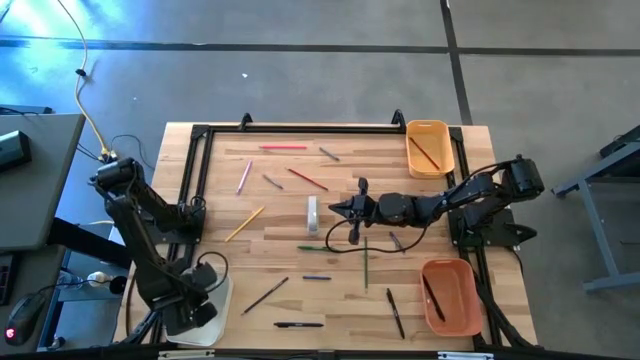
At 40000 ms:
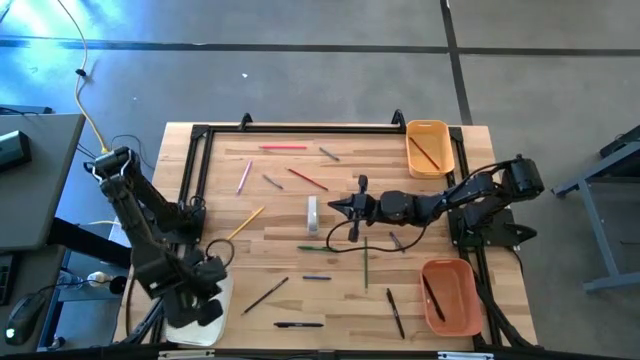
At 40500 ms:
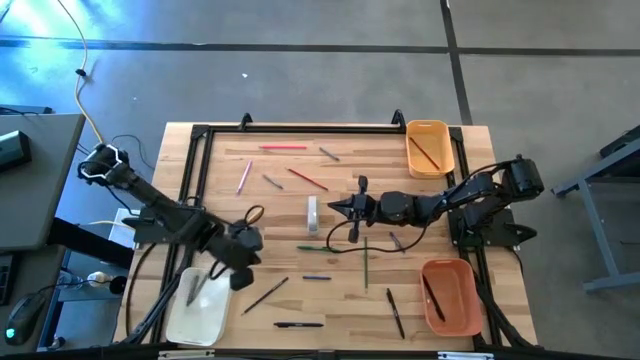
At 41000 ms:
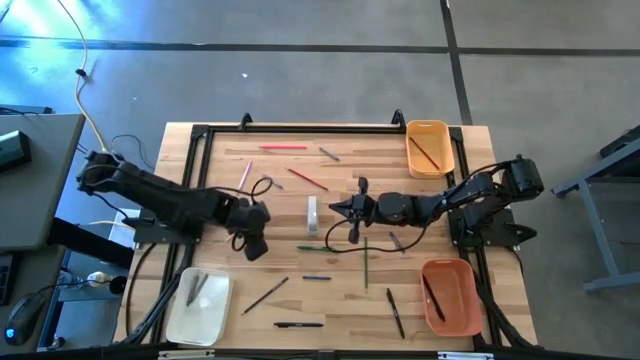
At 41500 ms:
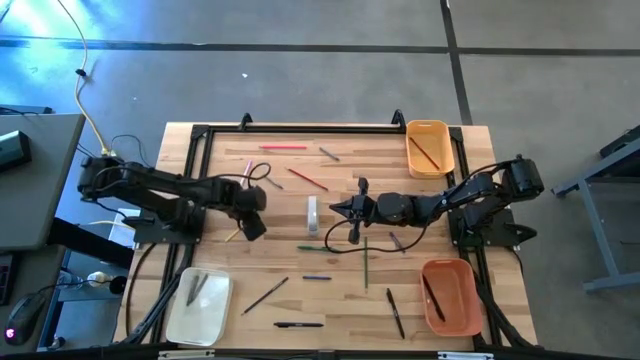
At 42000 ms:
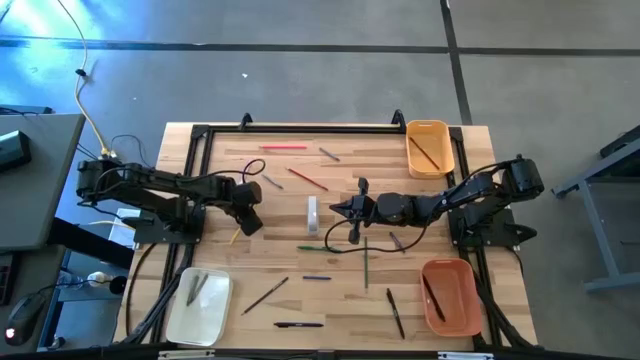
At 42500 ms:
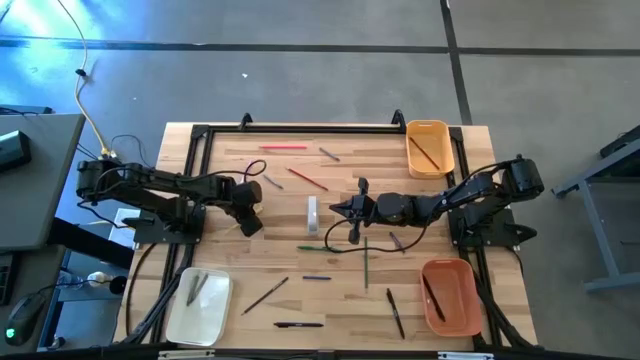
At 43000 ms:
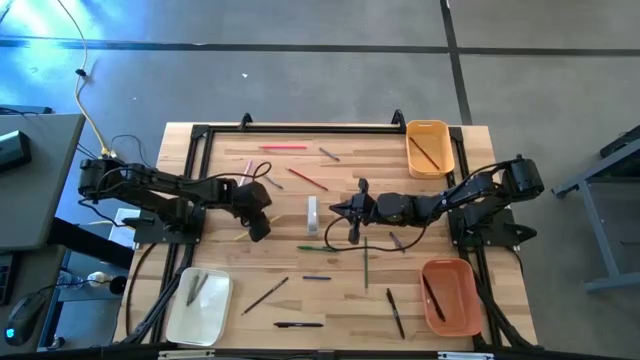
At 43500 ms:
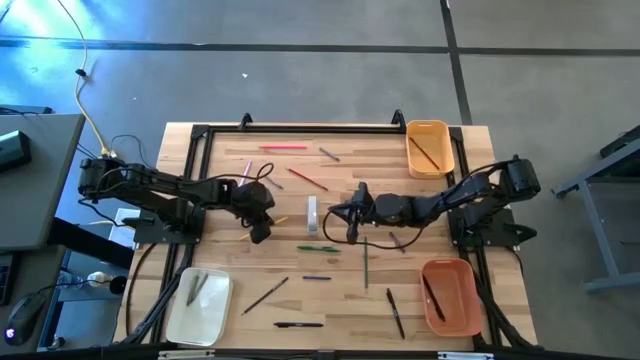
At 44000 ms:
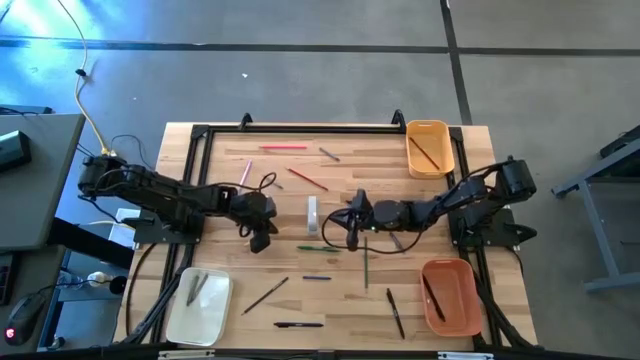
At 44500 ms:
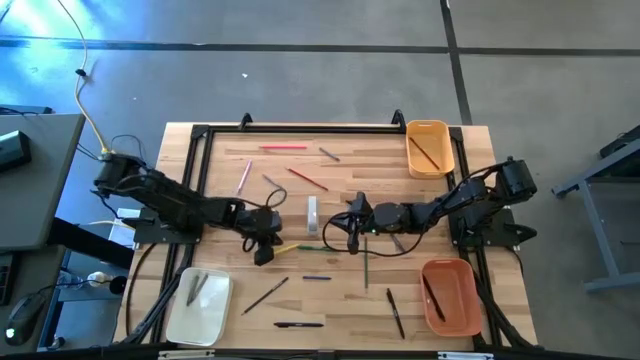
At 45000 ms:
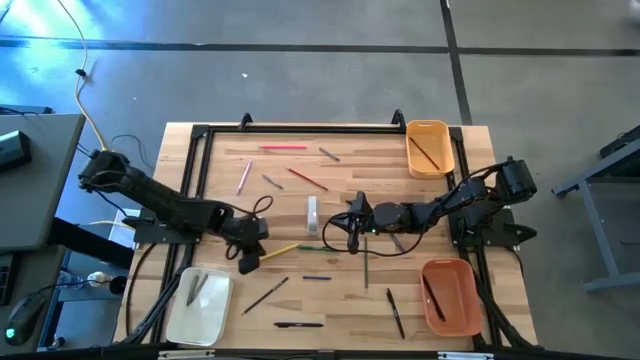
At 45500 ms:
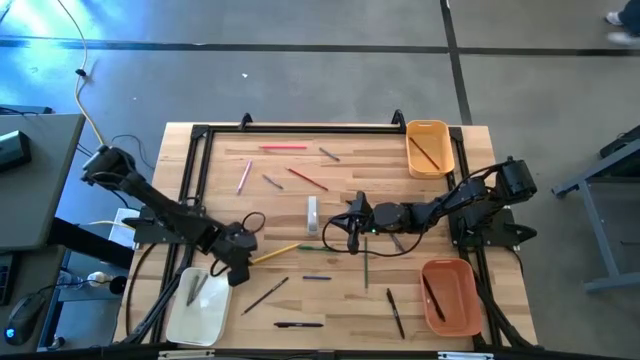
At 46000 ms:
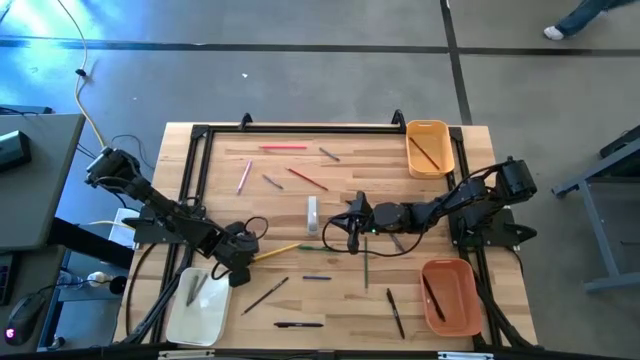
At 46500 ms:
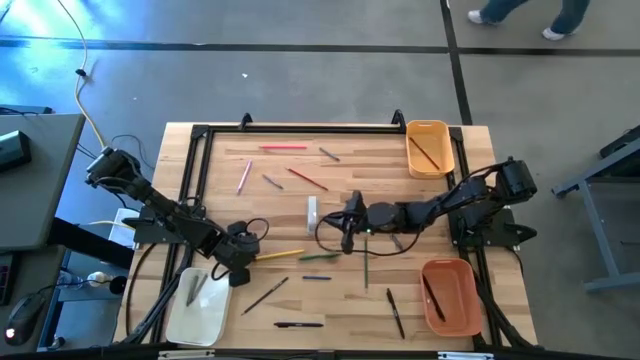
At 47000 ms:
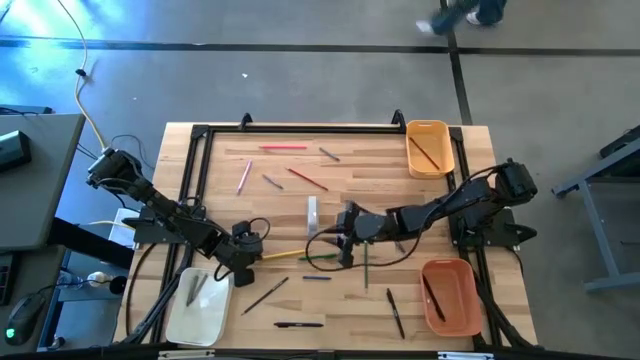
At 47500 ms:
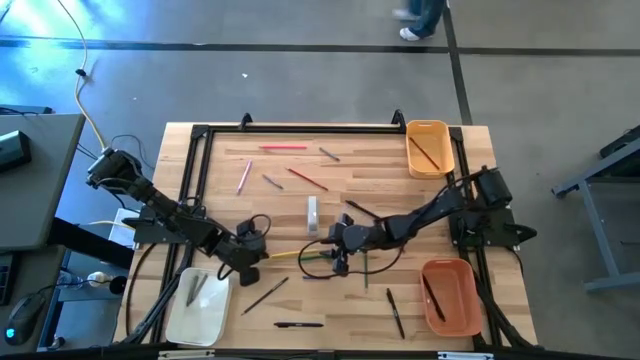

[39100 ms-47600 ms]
Task: Sort crayons/erasers/pens/pencils in bins
Put the yellow pencil into the yellow bin

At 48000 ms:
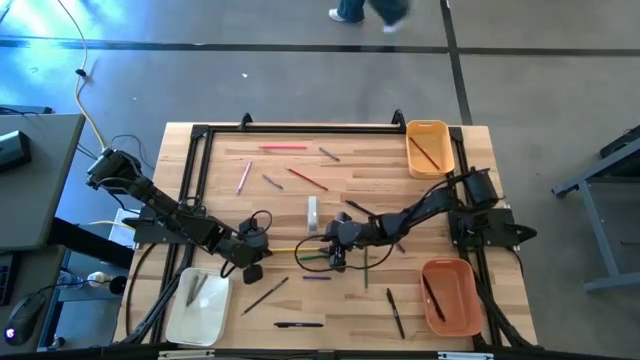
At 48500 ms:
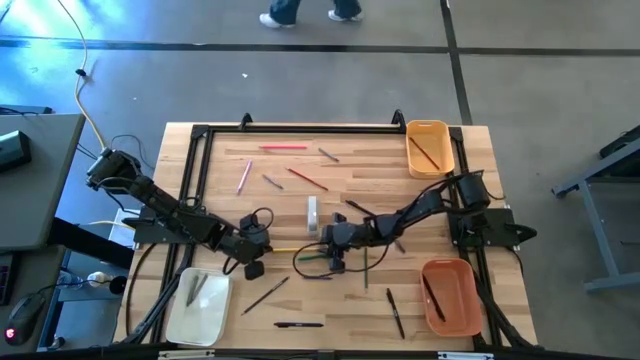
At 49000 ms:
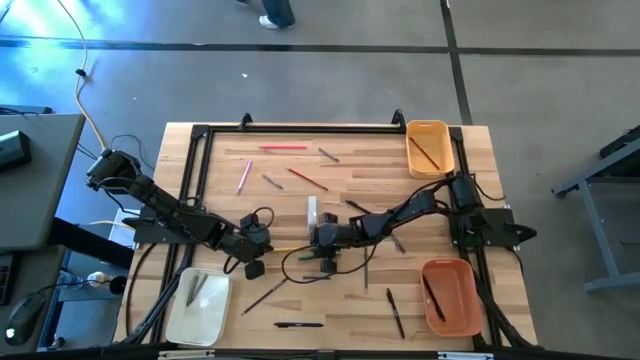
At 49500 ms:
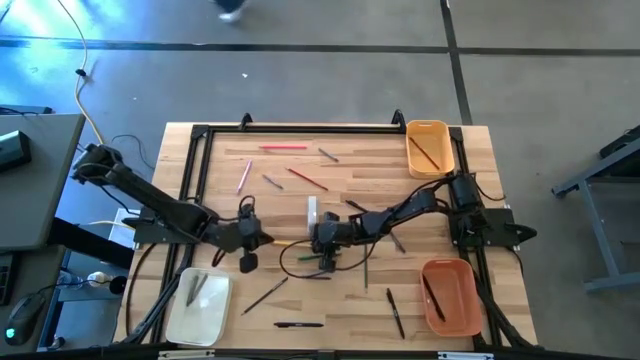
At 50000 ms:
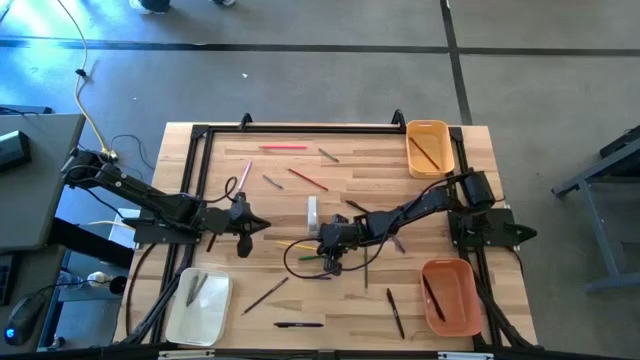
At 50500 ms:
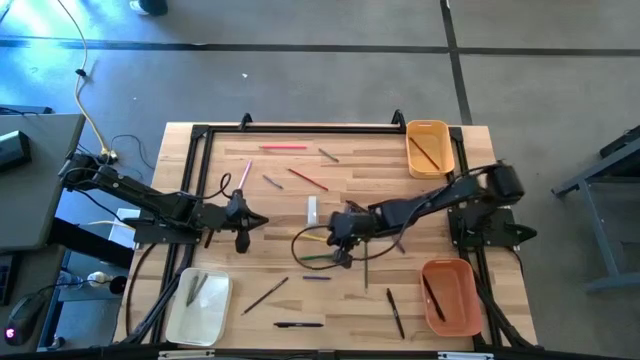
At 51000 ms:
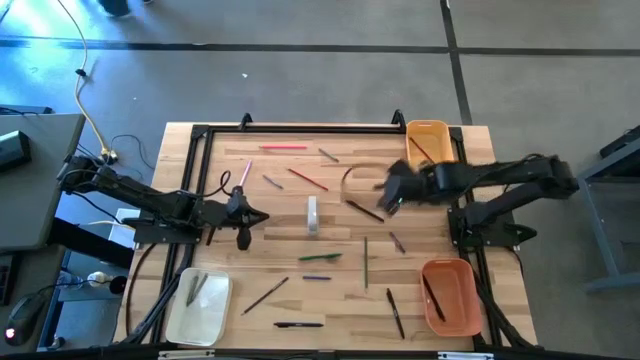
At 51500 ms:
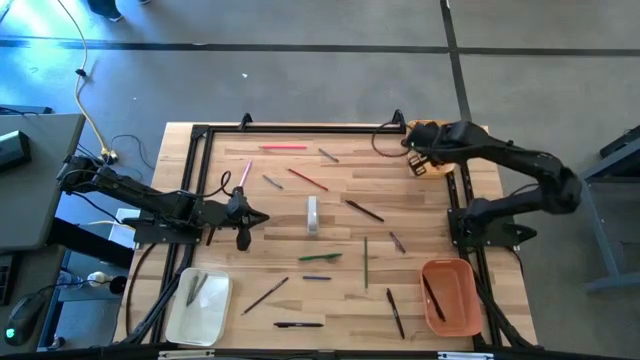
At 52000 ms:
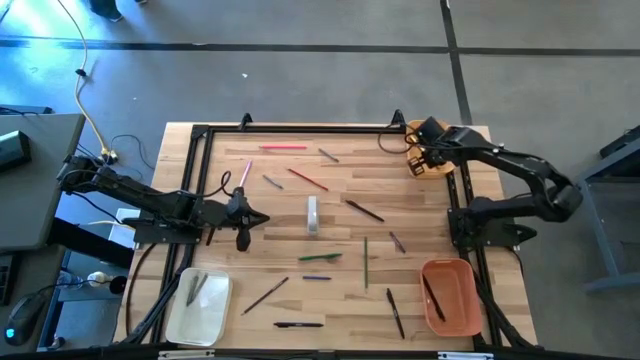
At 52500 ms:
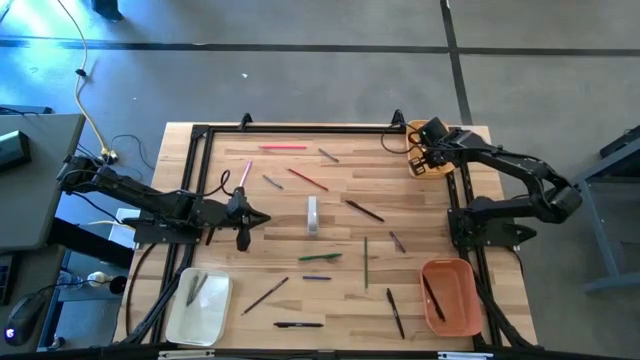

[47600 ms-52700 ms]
Put the yellow pencil into the yellow bin

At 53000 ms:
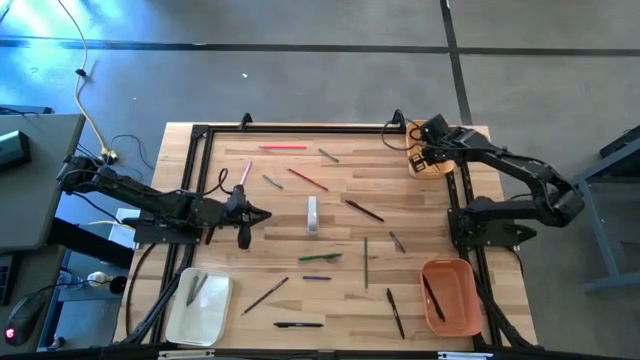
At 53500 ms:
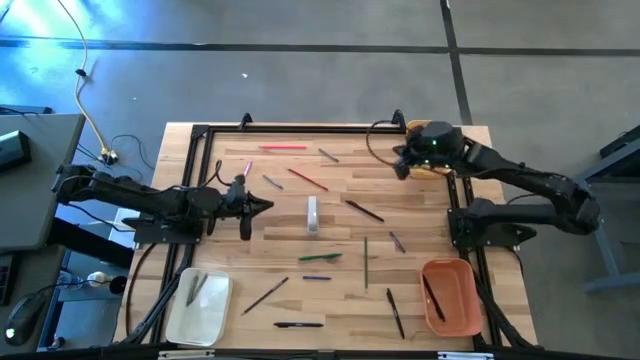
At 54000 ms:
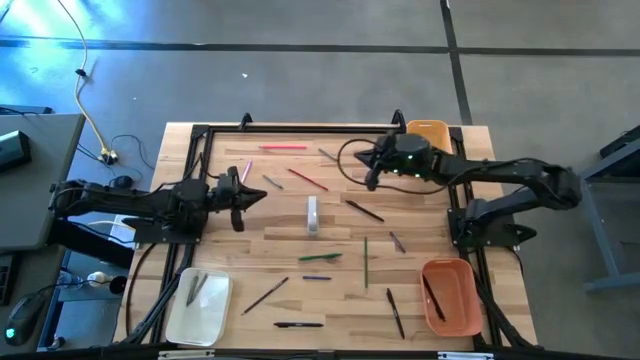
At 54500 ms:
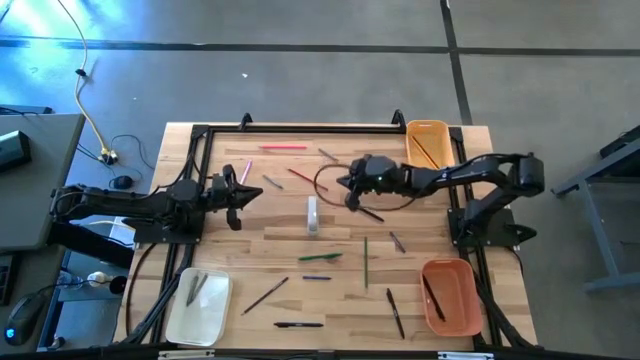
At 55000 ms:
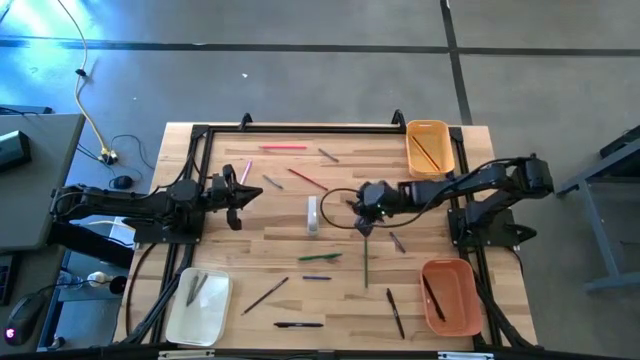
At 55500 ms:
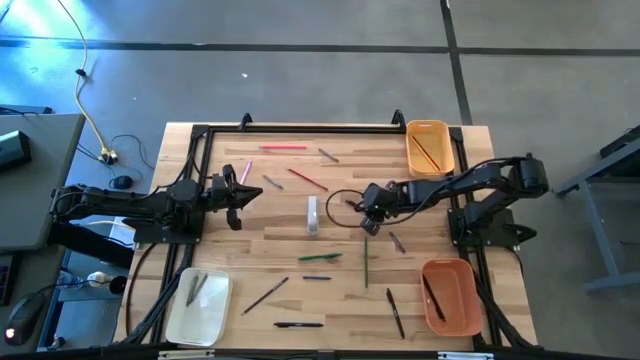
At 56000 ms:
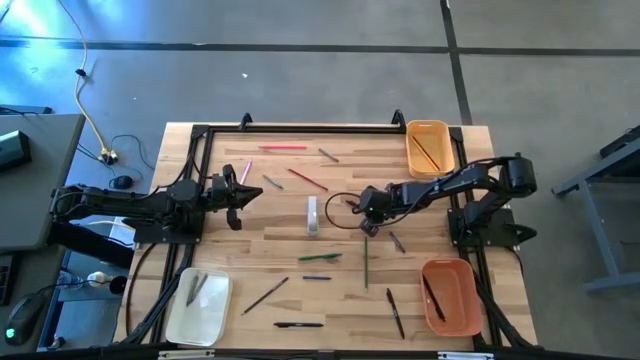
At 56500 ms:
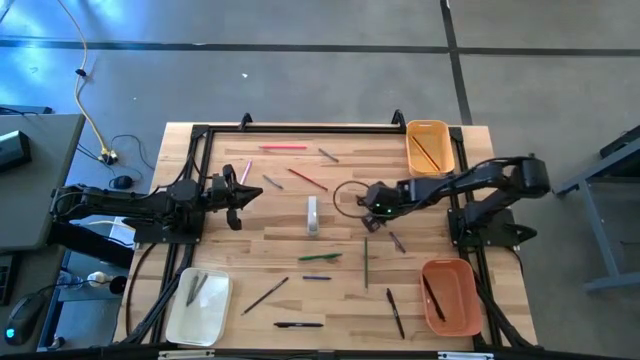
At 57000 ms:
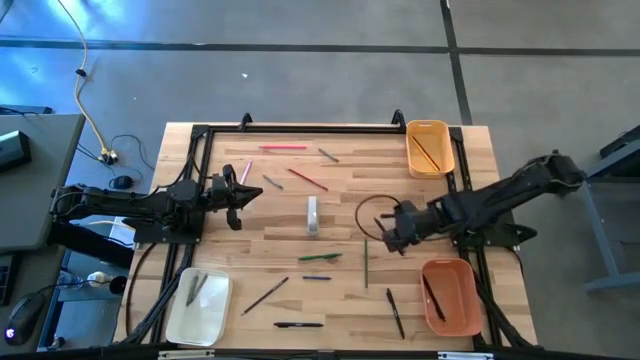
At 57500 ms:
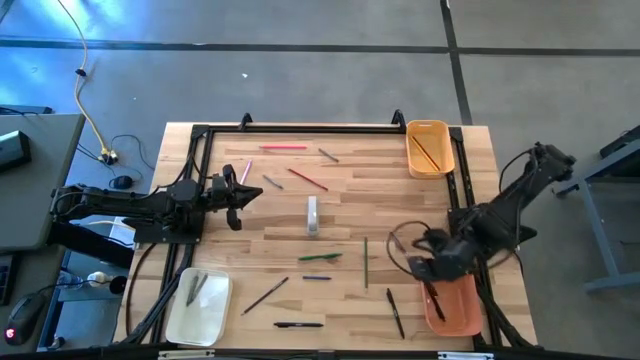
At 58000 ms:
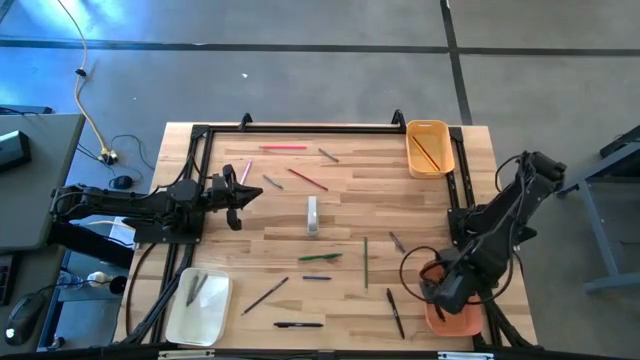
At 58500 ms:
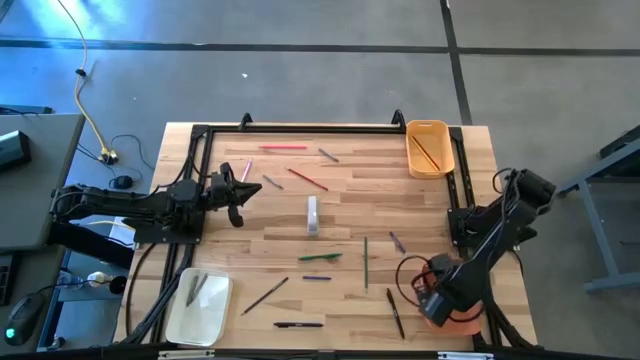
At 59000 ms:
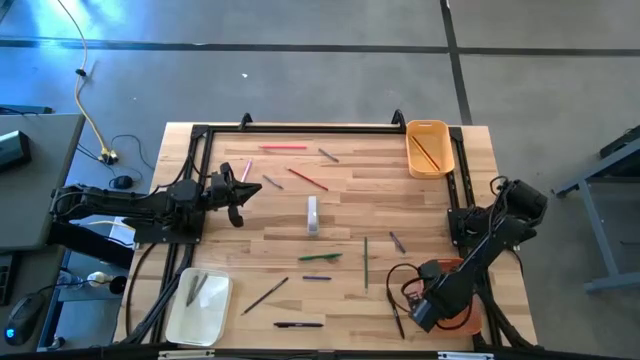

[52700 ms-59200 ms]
Put the black pen into the orange bin
